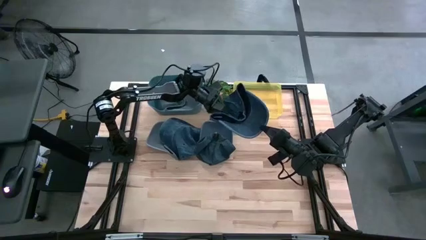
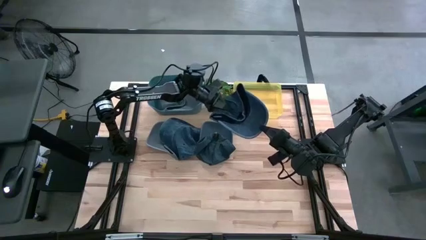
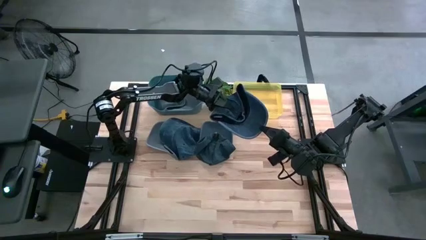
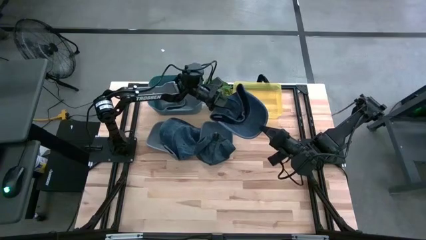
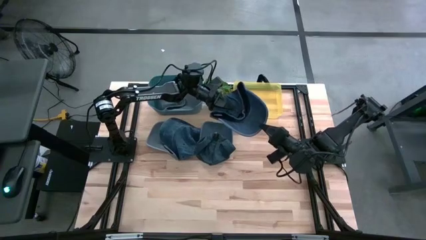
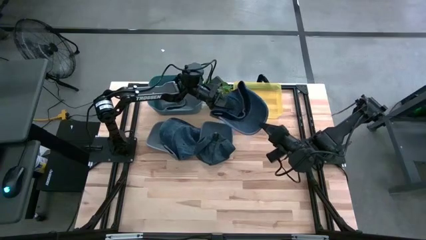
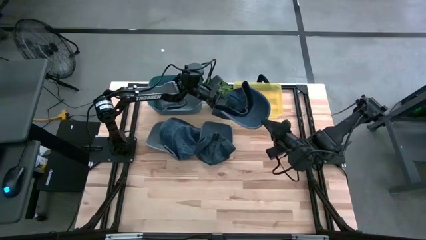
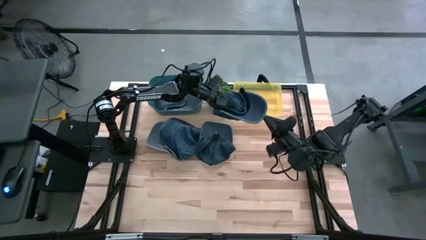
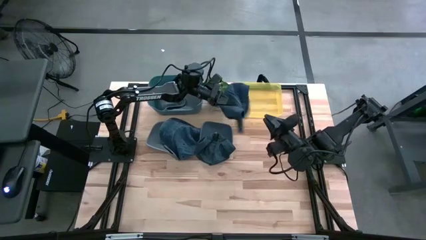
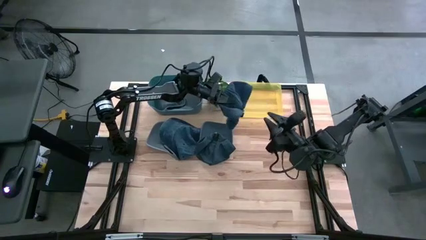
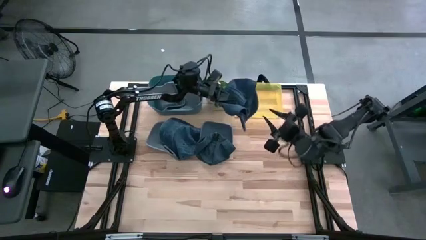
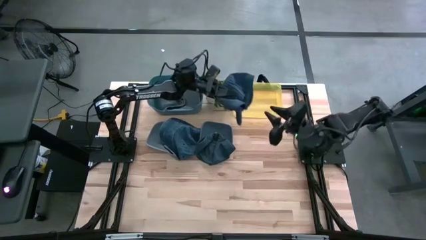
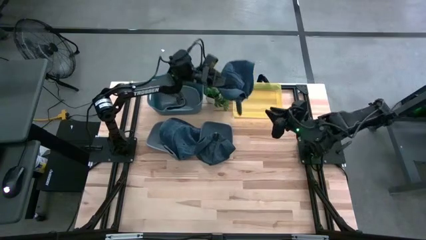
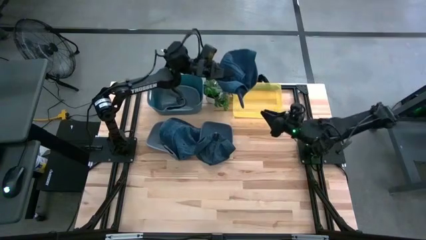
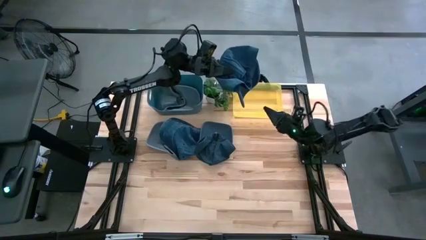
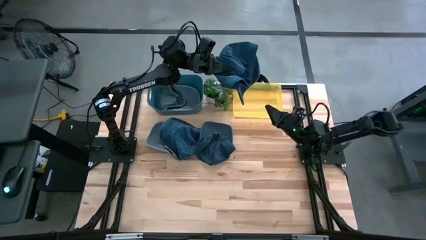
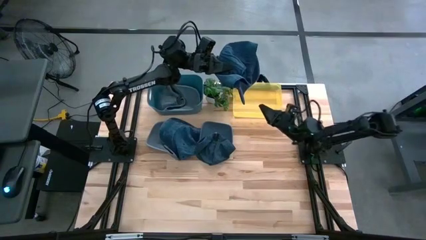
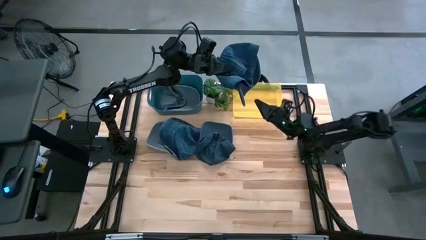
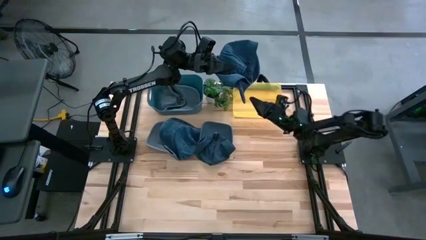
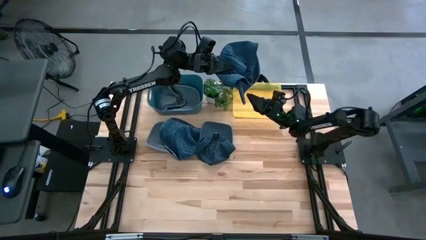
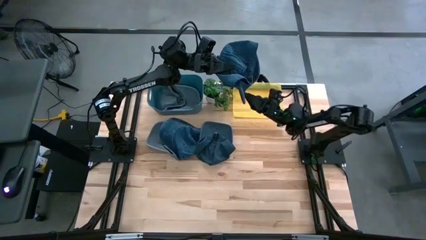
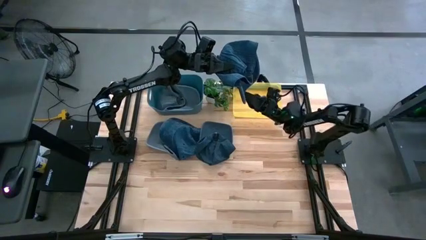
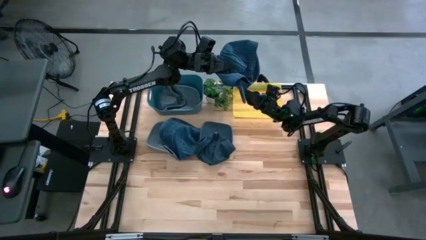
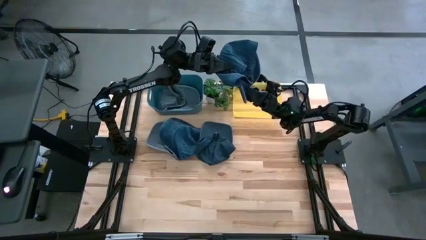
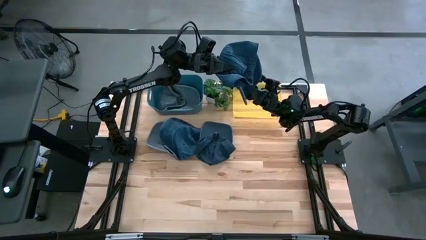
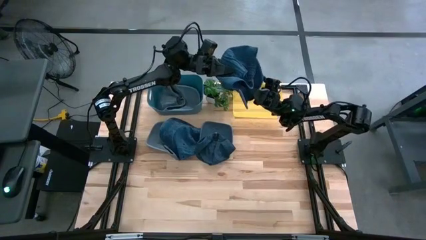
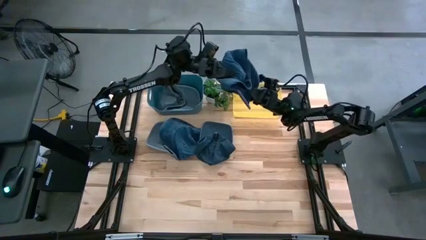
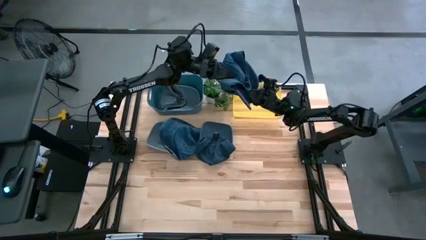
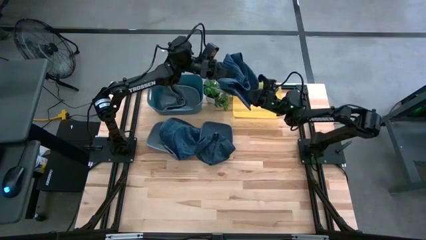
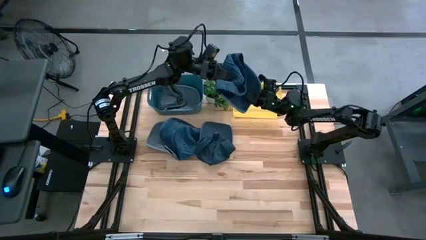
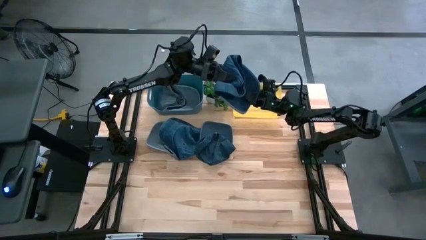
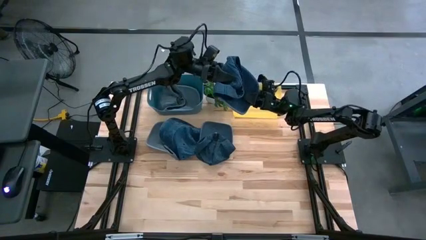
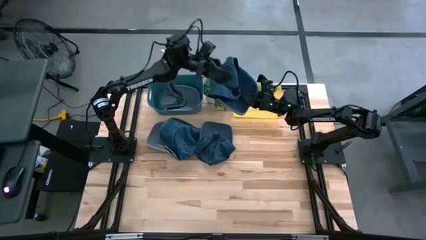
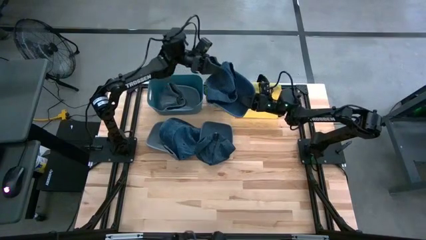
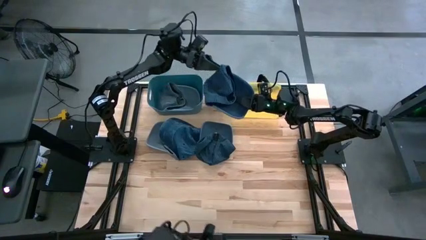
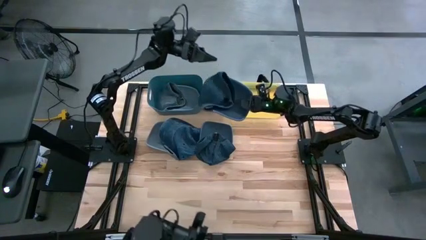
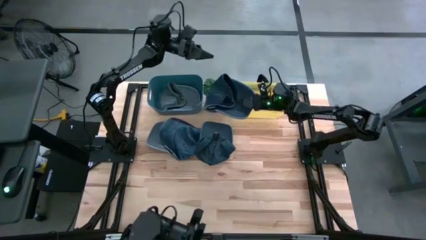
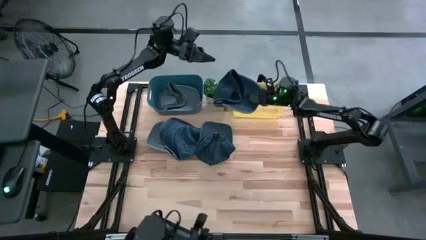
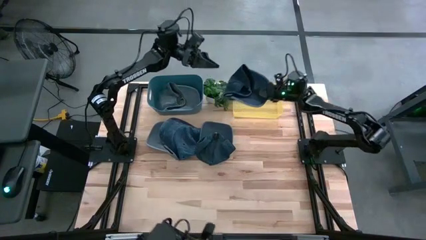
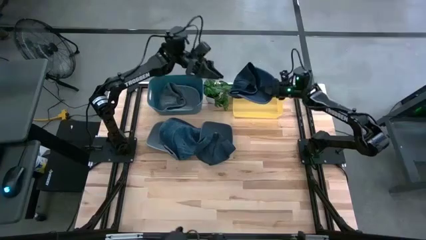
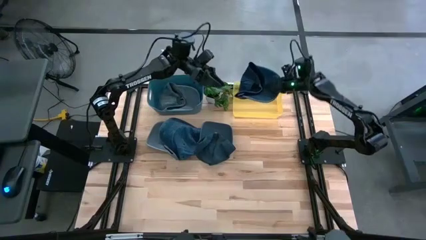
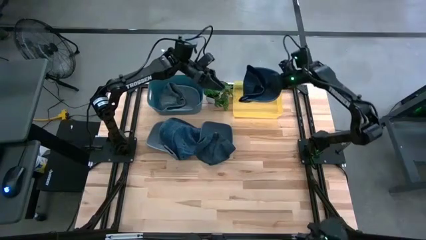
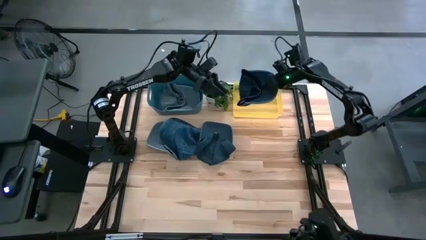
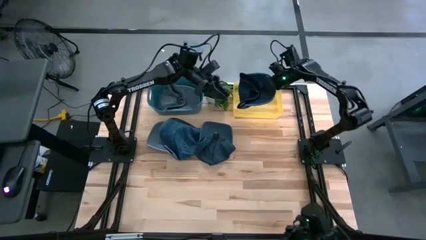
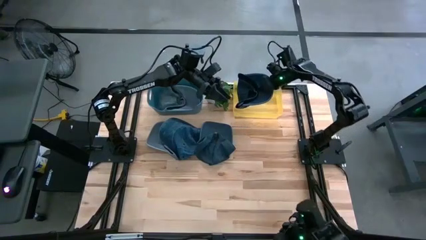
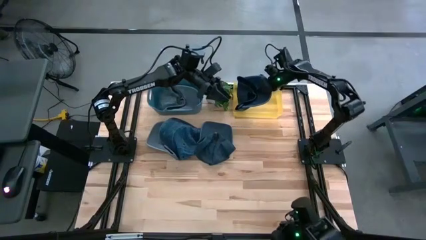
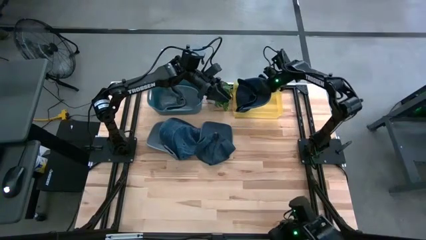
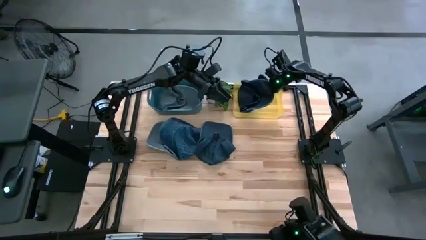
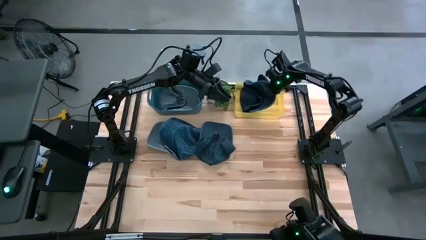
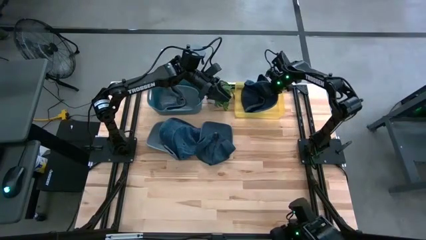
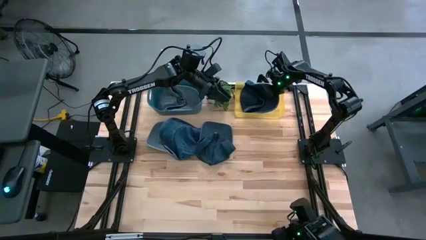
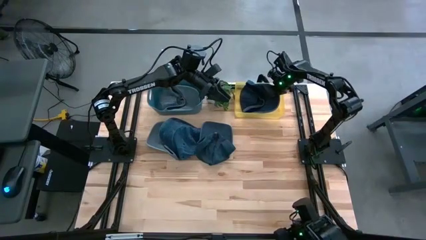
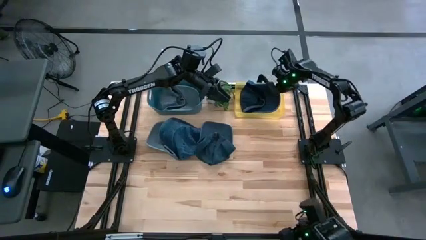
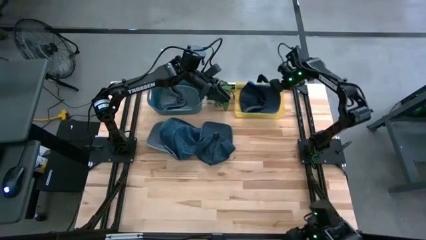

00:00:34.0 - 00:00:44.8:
Task: Pick & Place hat
Put the right blue cap into the yellow bin

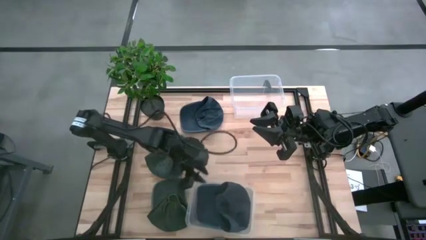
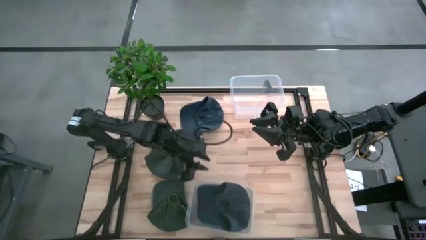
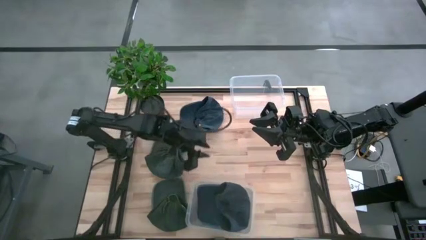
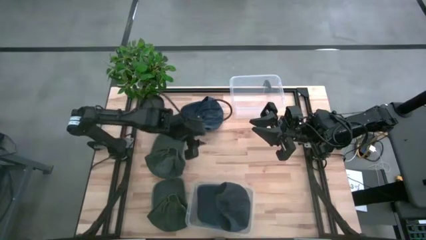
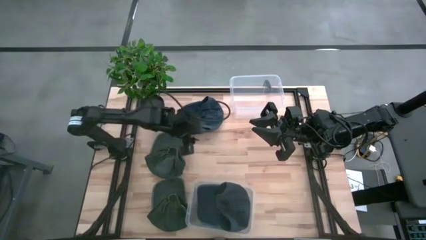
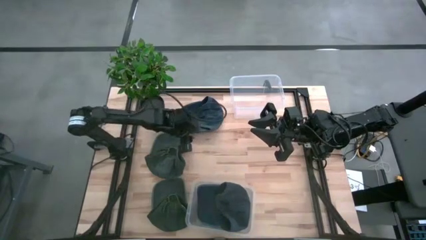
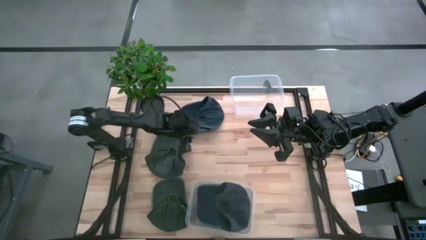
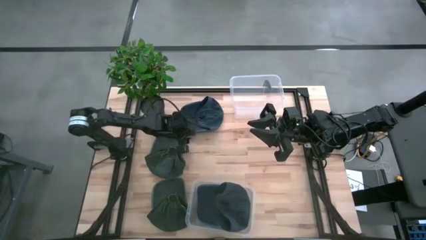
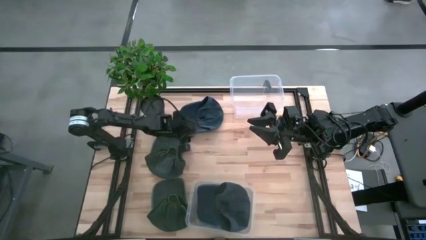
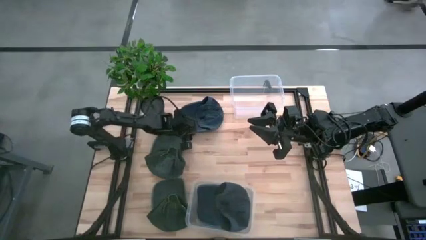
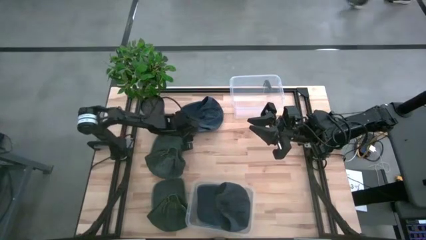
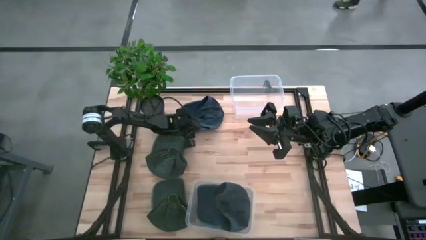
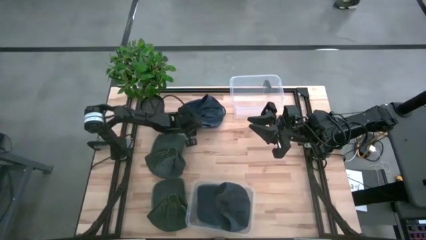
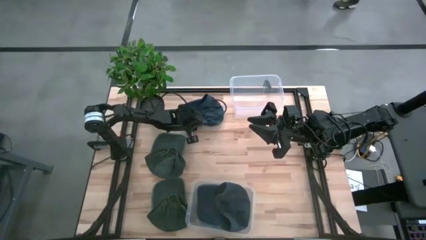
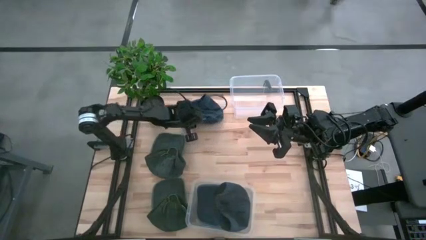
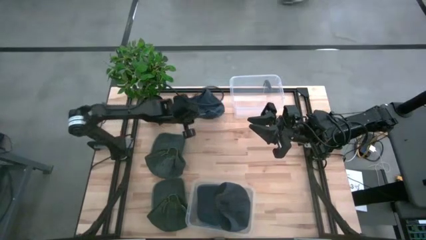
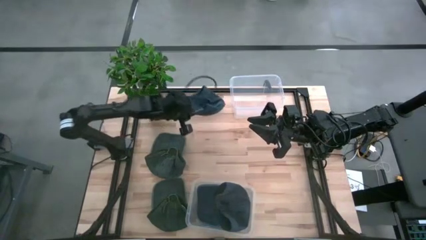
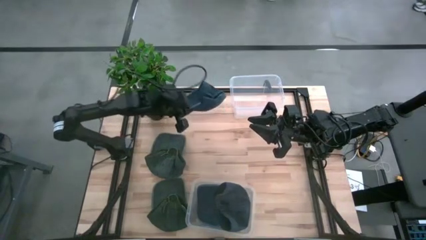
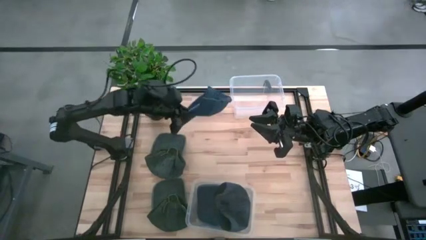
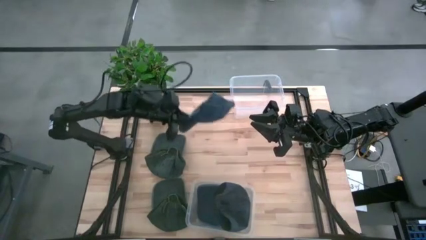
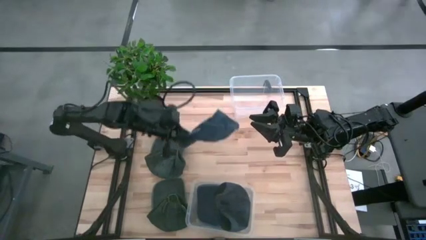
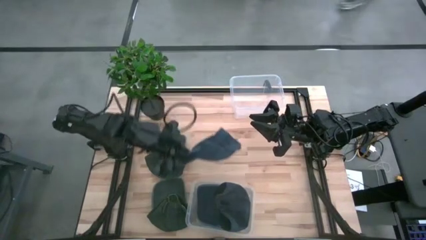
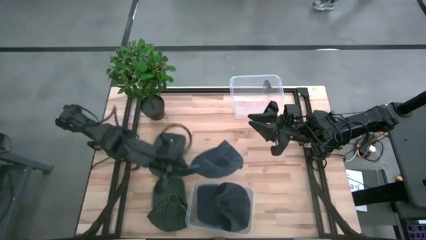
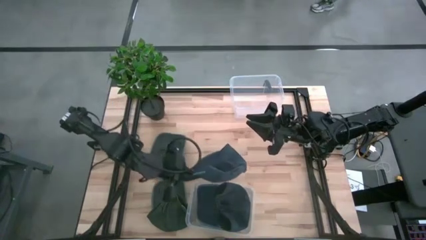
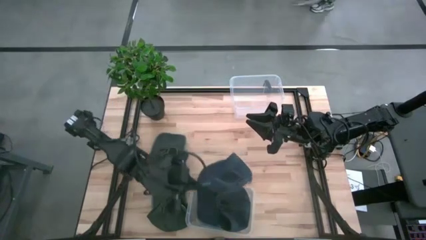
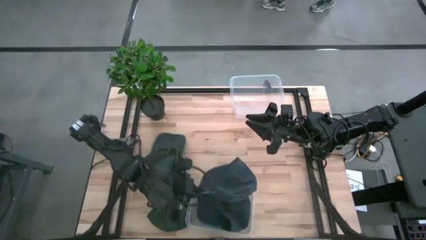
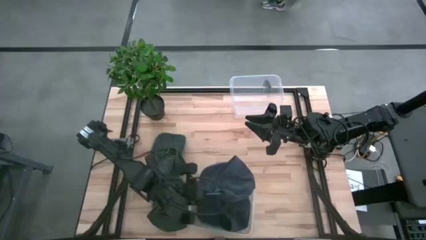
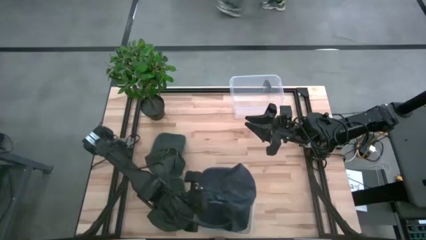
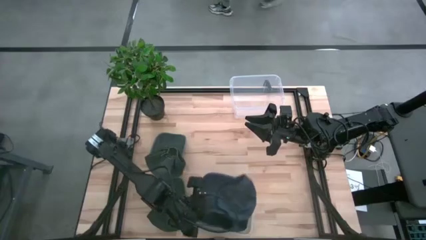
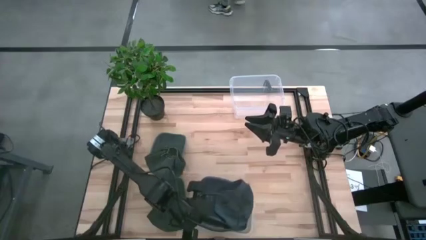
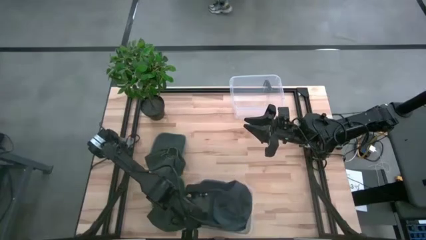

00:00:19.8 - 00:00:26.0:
Task: Pick & Place hat
Put the blue cap into the bottom transparent bin
